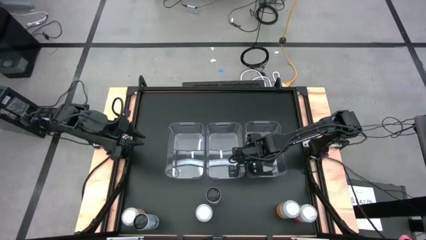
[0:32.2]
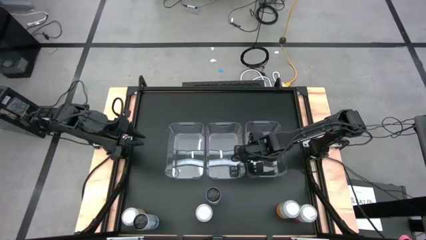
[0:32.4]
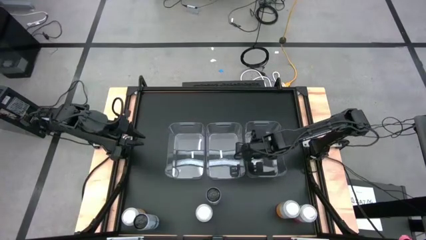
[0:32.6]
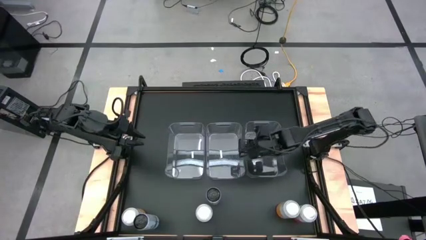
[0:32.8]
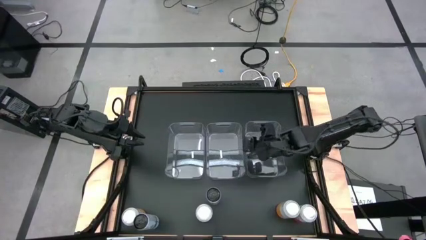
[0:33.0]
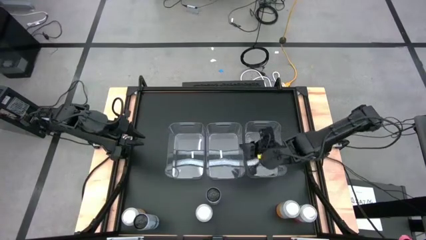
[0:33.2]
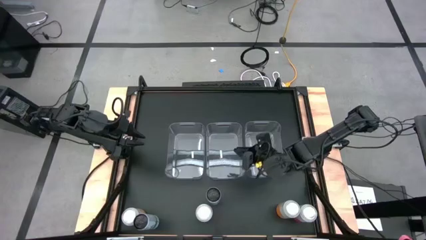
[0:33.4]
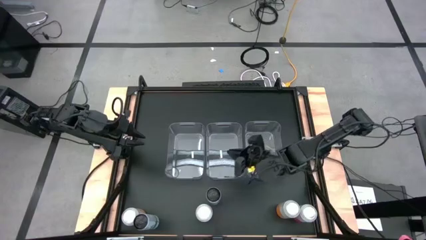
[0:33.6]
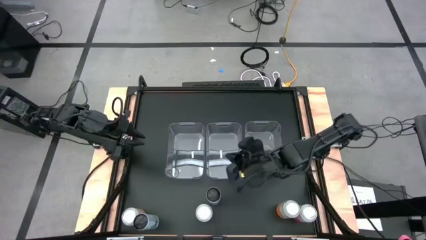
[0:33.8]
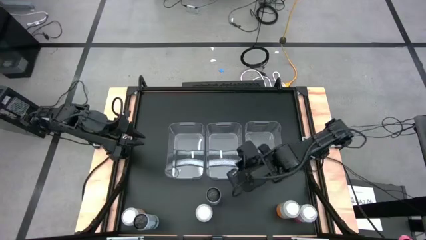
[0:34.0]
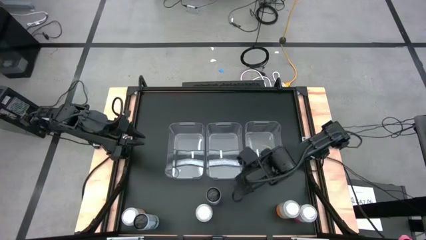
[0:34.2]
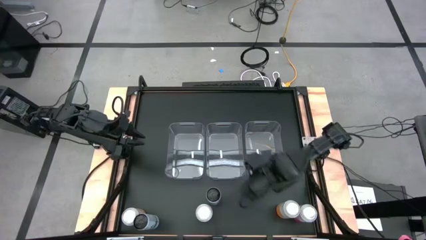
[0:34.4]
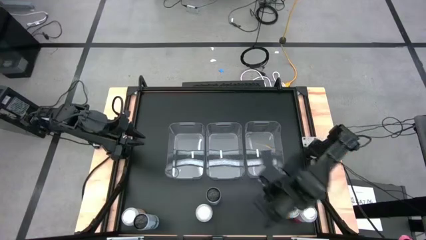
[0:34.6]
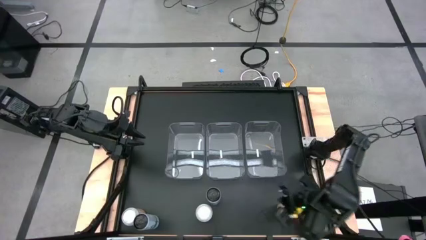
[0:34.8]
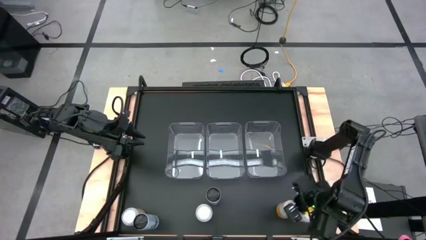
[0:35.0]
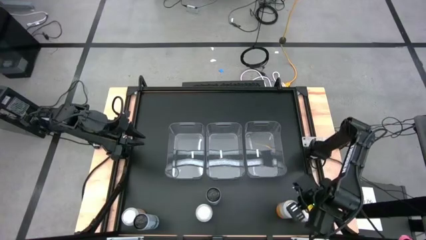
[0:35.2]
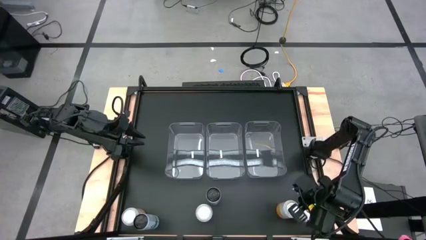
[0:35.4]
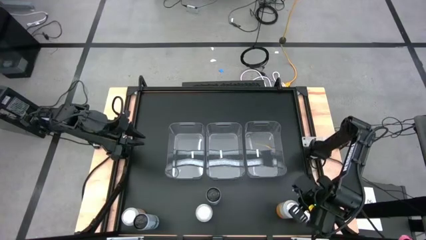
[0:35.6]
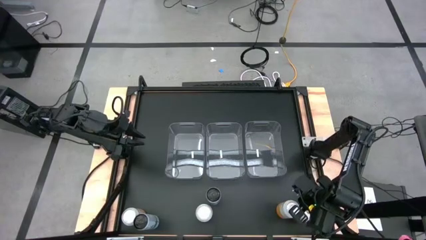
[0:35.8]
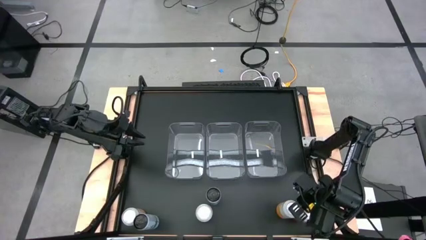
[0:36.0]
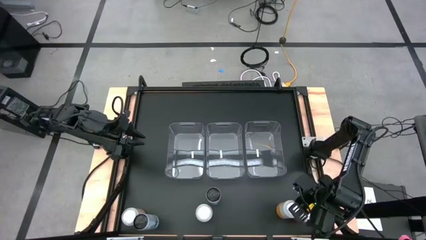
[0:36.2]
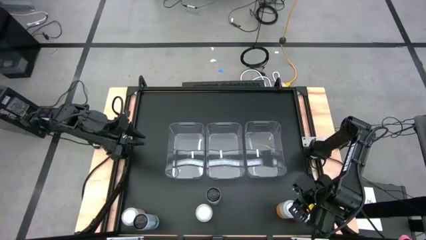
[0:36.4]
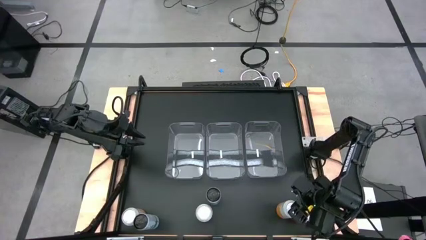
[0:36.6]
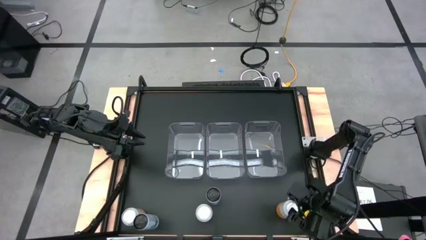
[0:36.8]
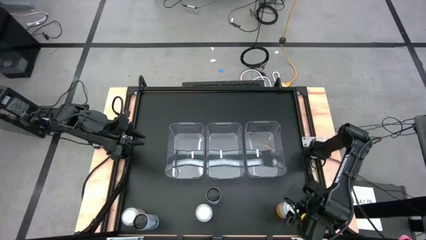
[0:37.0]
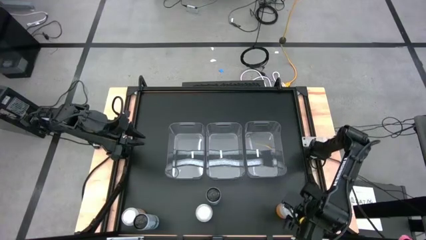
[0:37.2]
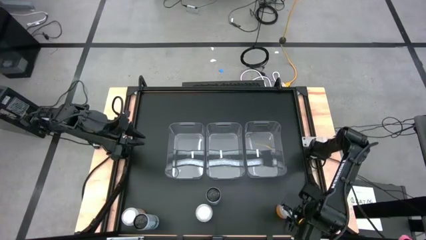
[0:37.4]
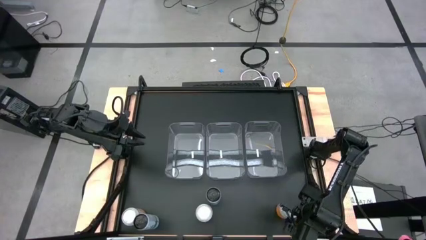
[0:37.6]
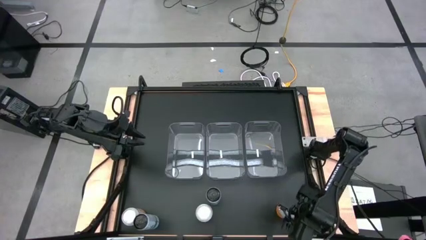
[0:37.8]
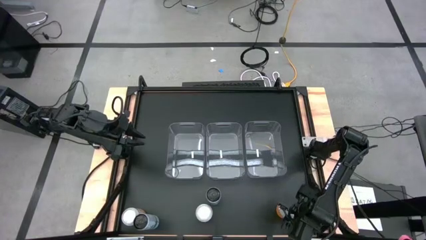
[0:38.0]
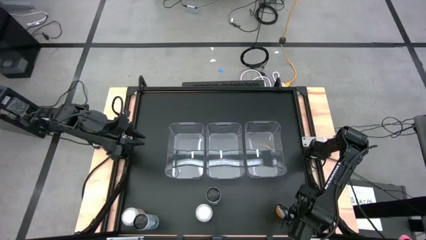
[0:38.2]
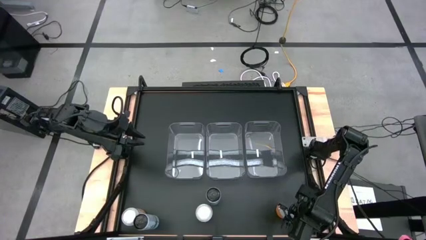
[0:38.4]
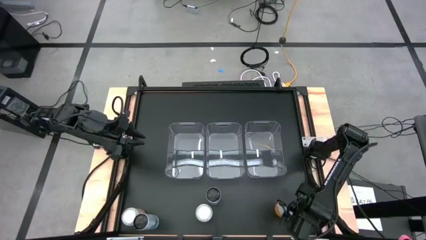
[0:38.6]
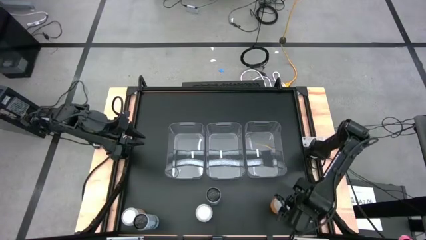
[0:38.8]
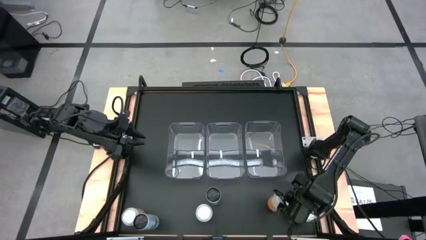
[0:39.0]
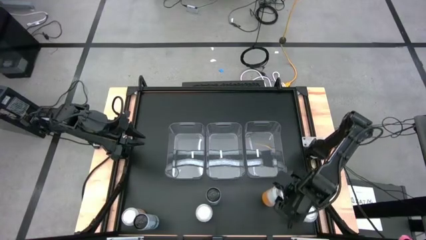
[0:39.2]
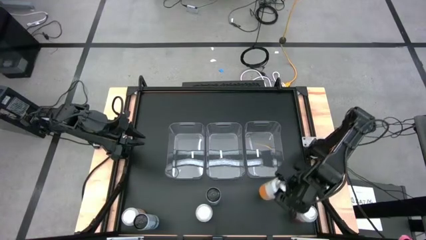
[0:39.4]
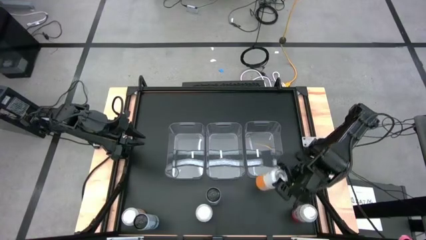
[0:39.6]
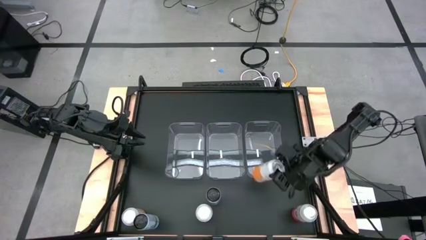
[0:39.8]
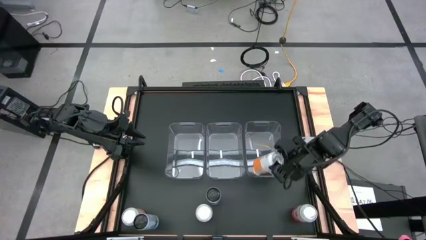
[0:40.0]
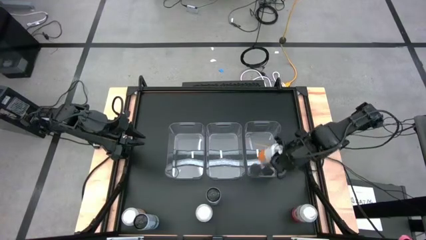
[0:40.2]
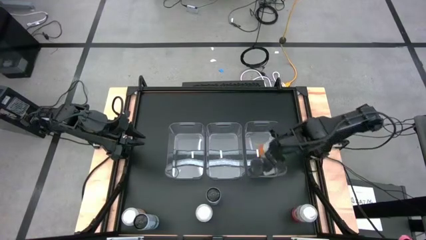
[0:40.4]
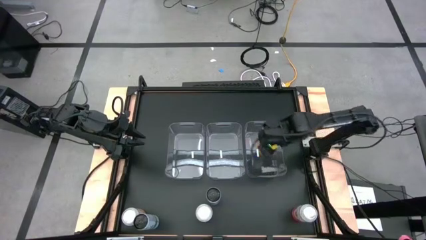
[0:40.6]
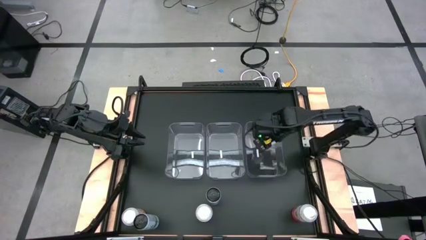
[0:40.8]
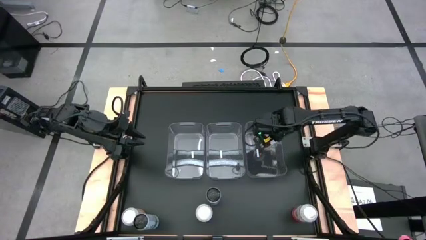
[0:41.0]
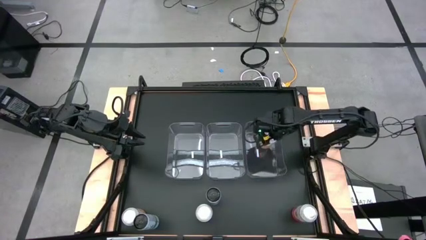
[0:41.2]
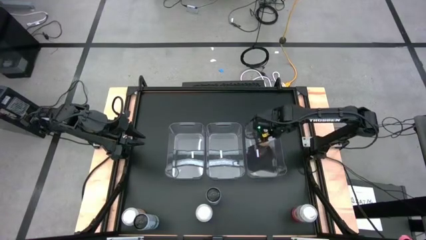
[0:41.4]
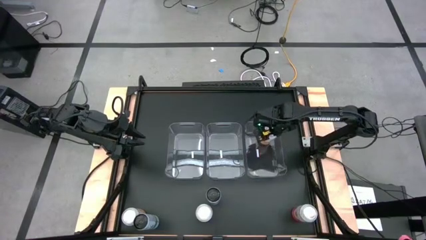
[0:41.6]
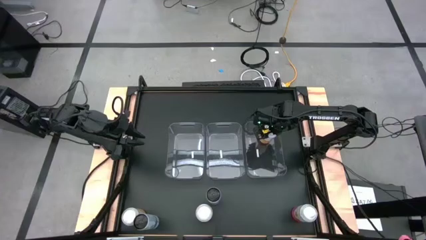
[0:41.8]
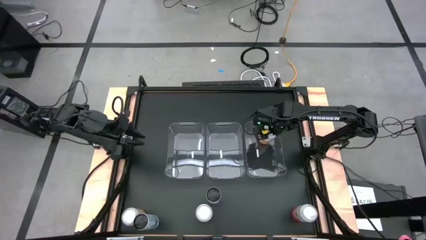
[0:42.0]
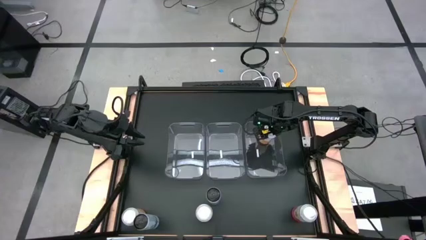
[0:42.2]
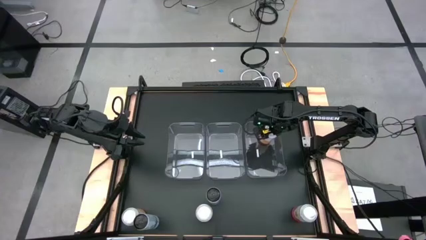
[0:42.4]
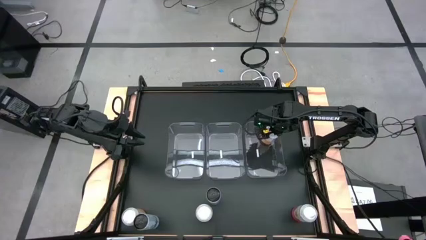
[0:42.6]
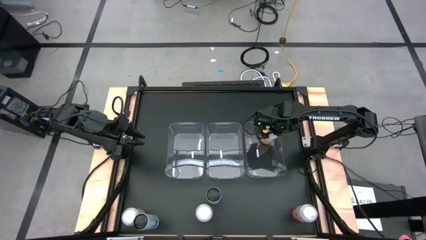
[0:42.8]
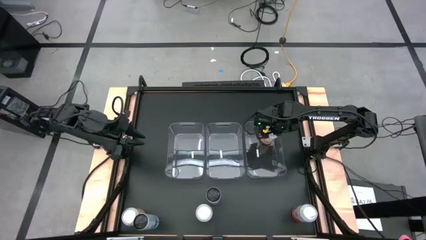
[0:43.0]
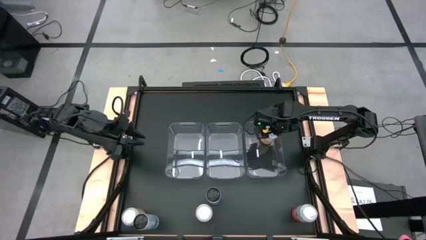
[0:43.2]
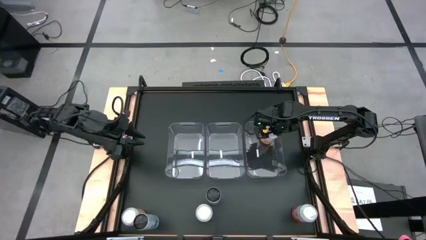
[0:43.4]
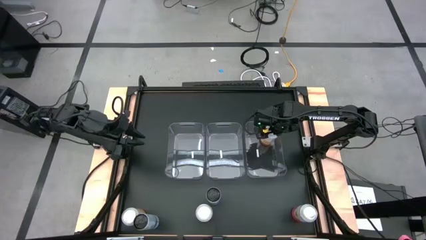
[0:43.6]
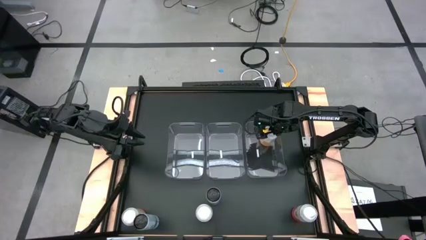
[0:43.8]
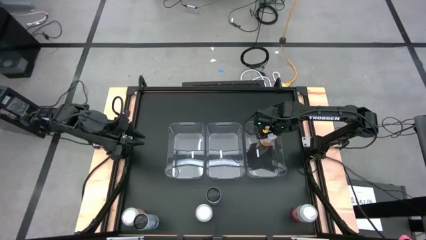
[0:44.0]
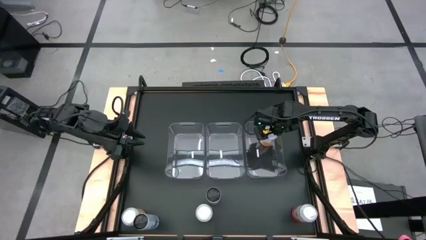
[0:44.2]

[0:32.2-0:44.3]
Task: Sort soda cans
Put the right yellow-white soda can into the right transparent bin

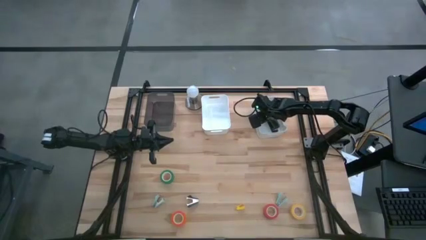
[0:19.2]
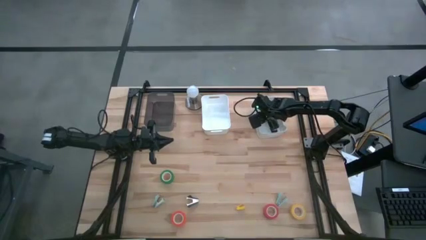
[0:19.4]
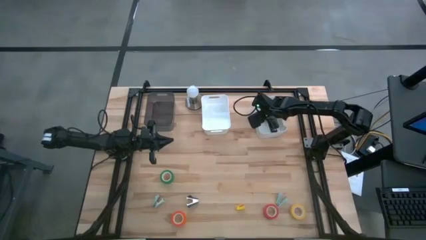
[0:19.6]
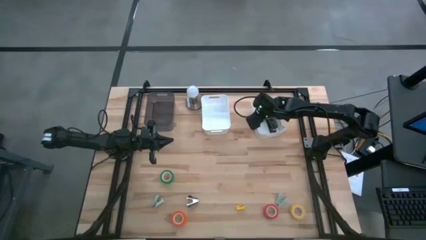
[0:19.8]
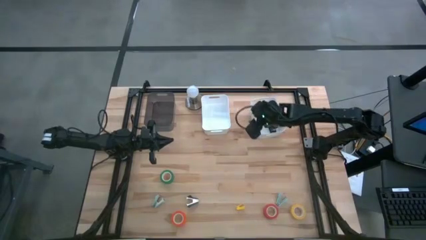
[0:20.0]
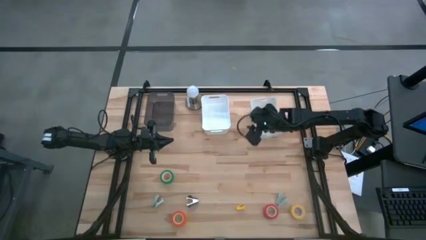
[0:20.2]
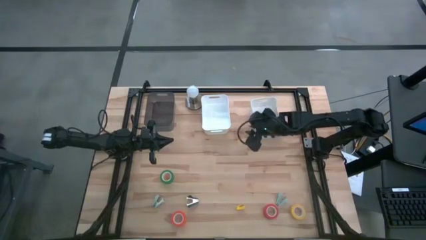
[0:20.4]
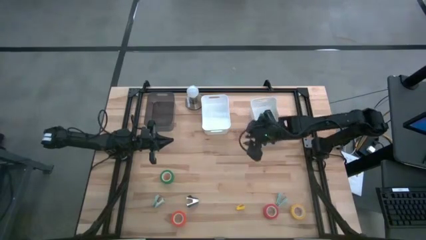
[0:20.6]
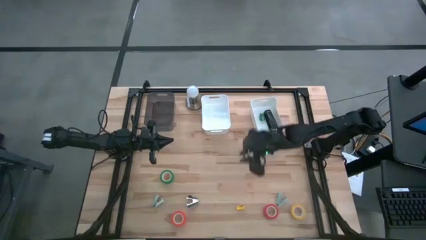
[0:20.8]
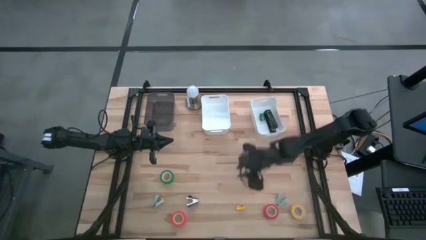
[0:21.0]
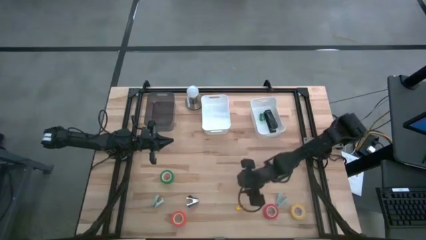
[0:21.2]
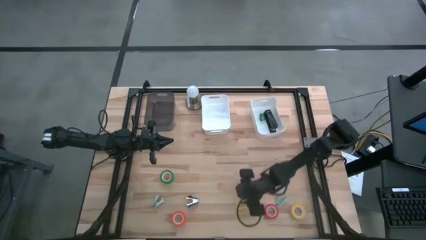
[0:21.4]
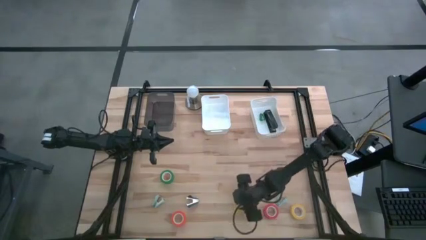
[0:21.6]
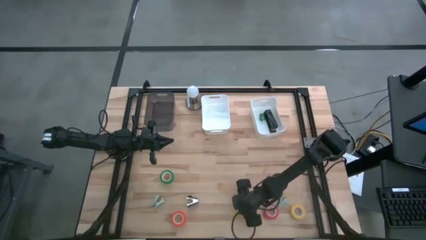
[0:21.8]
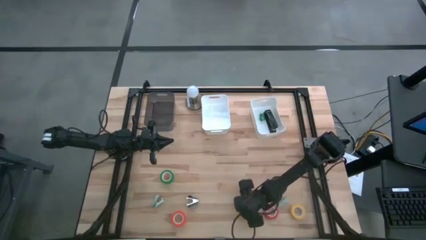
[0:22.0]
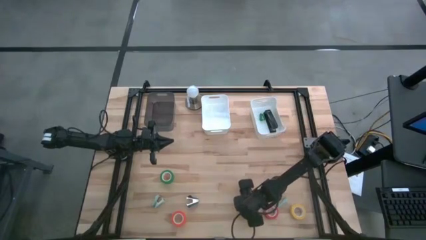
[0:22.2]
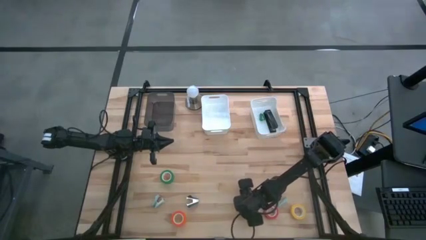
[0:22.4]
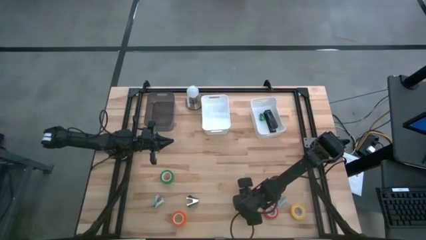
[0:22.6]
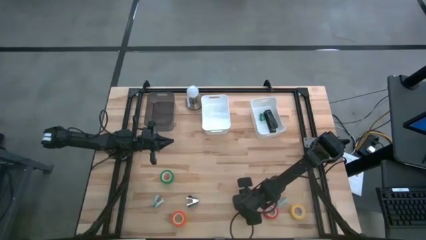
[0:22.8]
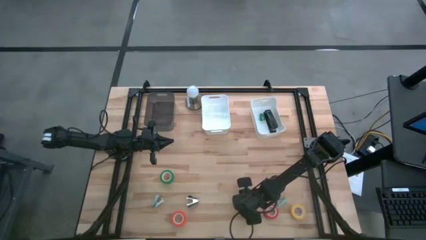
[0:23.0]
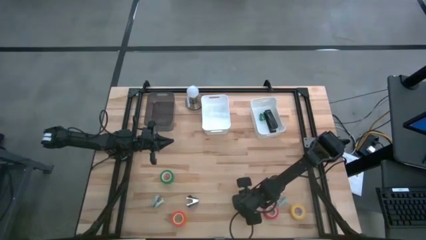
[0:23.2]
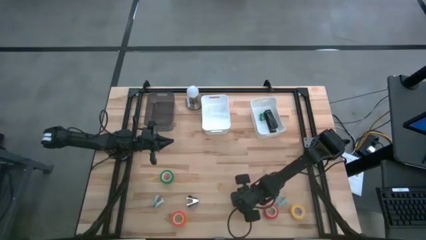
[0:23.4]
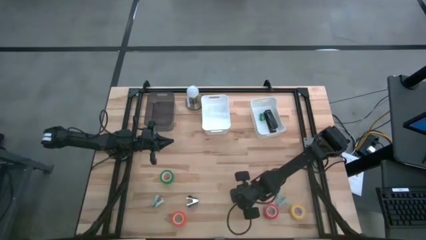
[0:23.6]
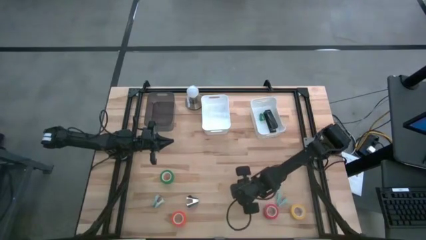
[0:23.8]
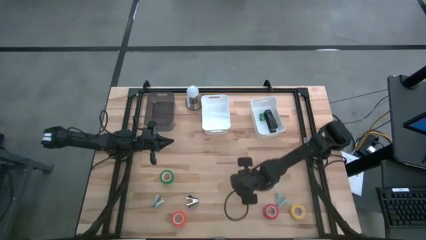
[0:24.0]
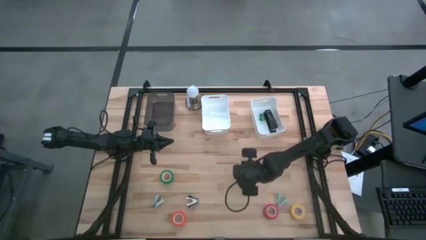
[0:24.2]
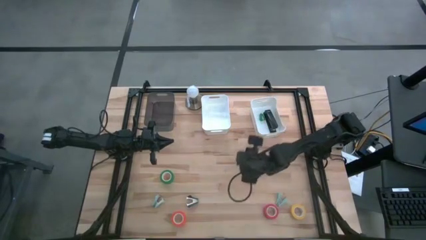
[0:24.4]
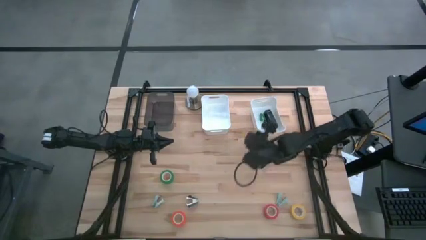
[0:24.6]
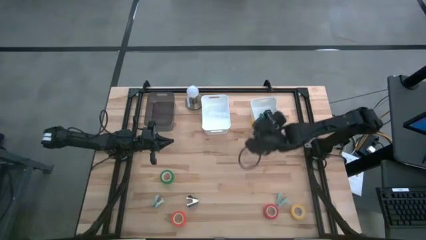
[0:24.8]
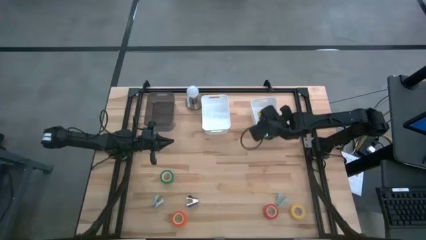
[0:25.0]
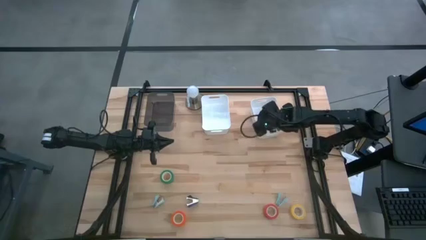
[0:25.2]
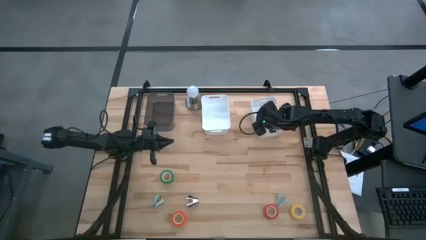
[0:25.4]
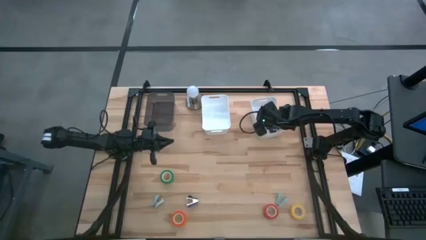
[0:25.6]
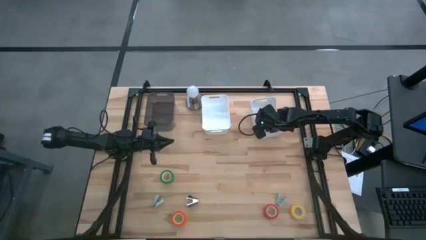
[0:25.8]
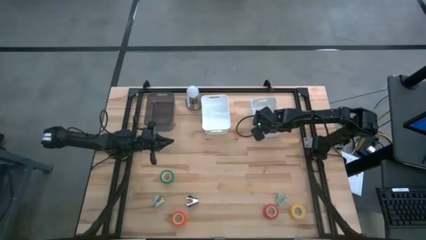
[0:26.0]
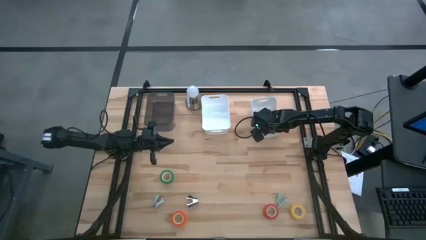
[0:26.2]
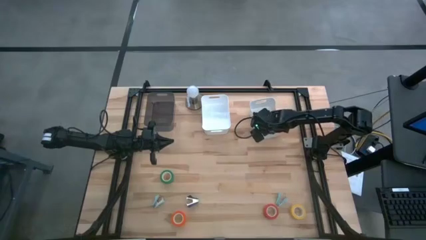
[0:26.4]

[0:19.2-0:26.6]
Task: Pick and place Stapler, Stapler remover, tape
Put the yellow stapler into the right white bin
